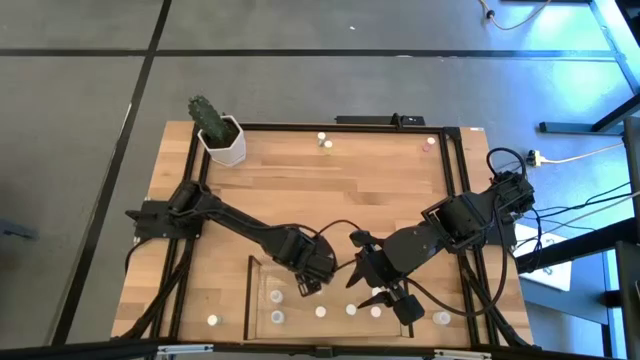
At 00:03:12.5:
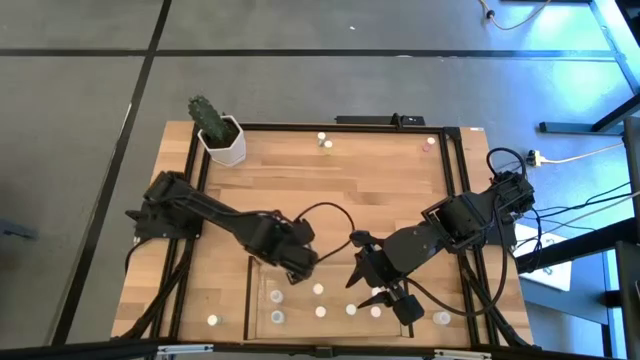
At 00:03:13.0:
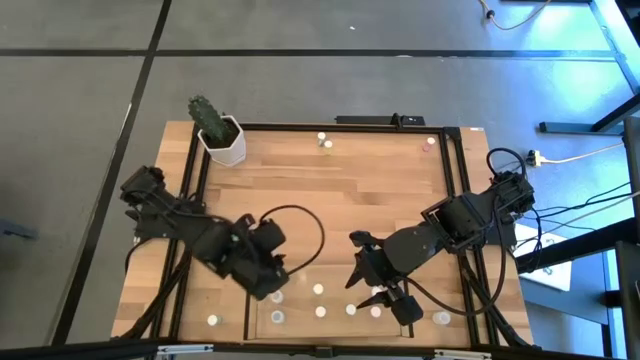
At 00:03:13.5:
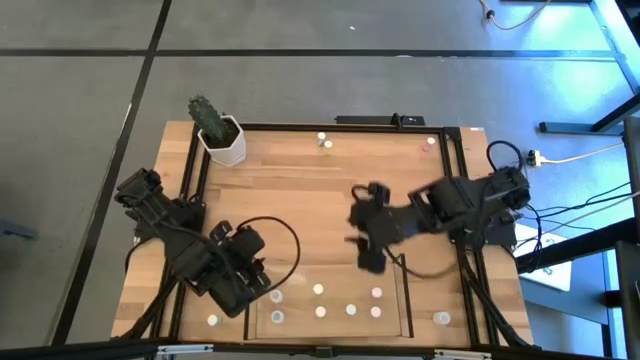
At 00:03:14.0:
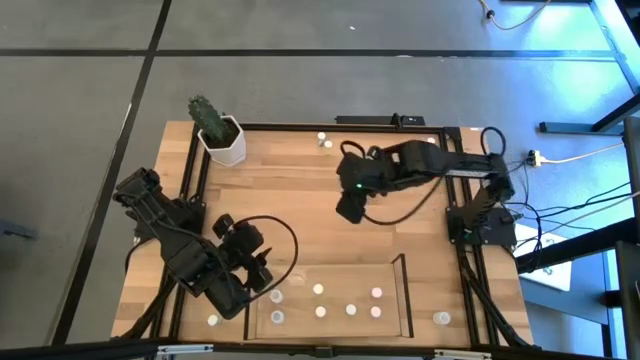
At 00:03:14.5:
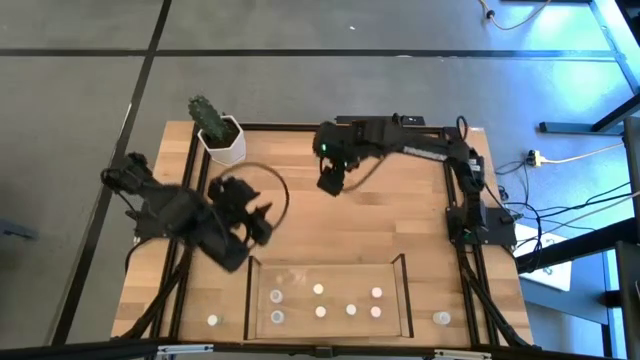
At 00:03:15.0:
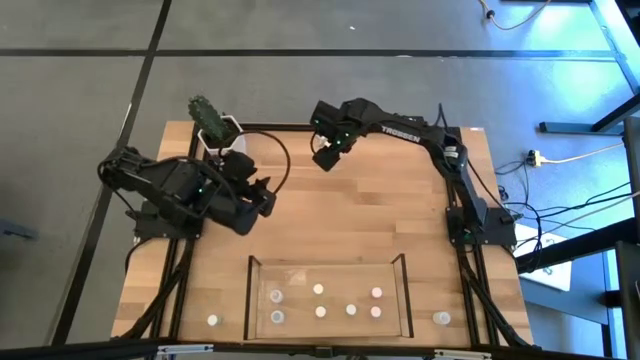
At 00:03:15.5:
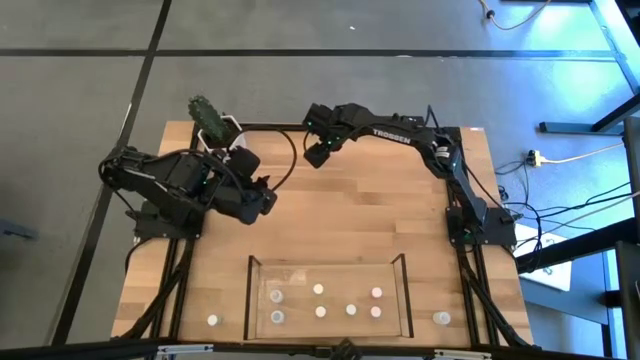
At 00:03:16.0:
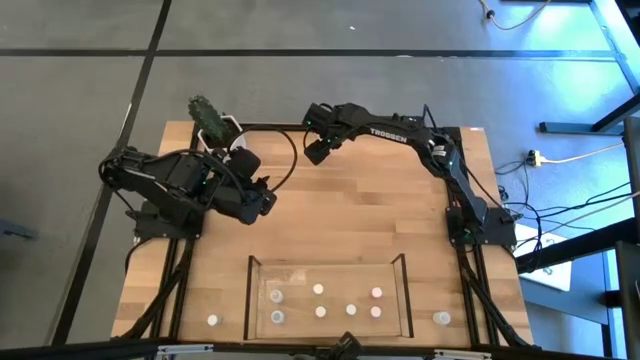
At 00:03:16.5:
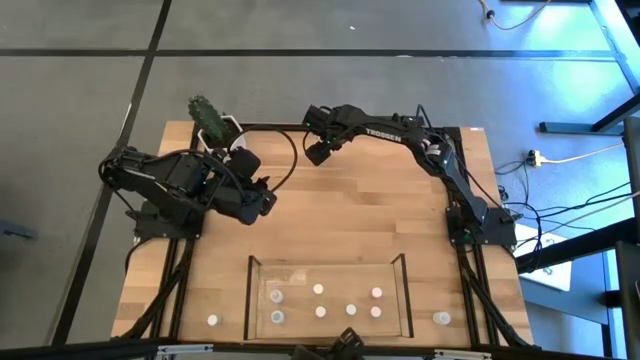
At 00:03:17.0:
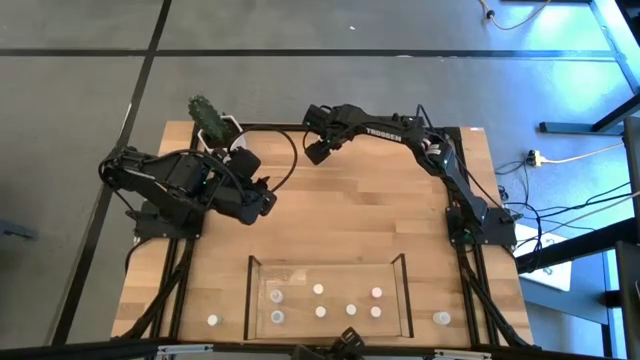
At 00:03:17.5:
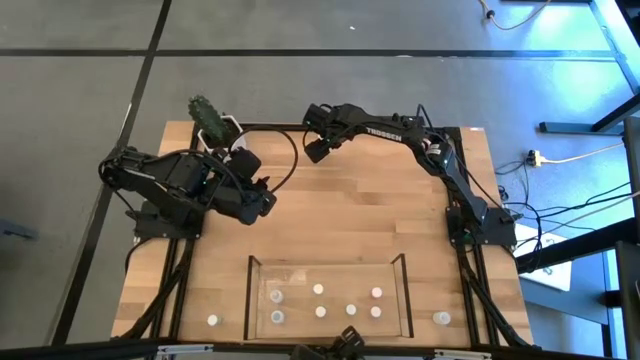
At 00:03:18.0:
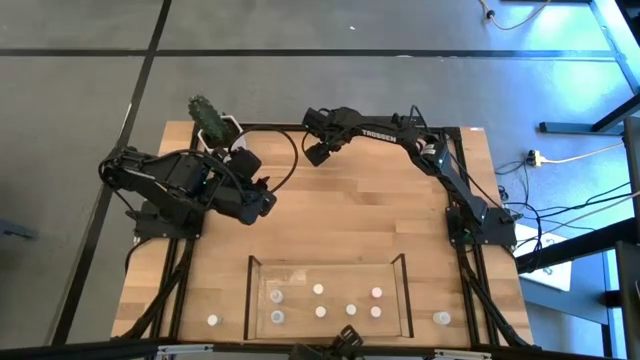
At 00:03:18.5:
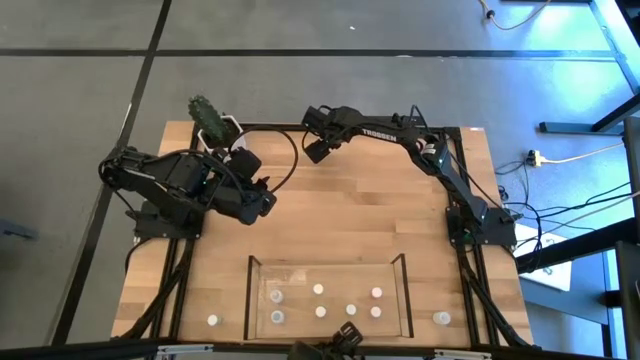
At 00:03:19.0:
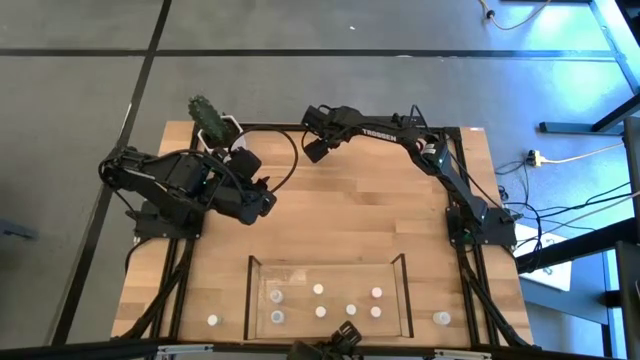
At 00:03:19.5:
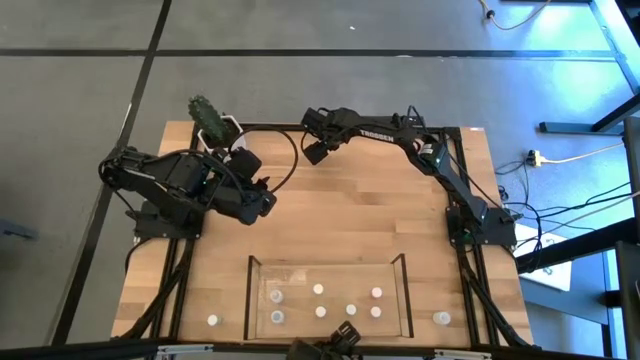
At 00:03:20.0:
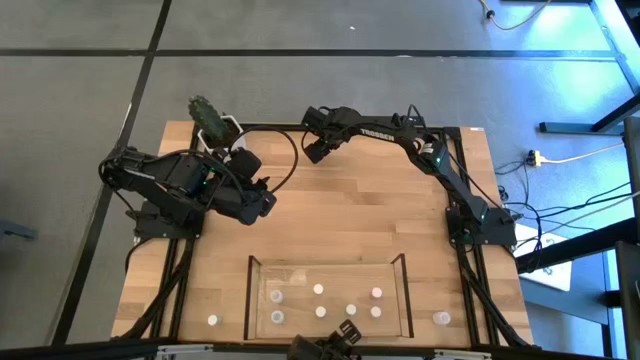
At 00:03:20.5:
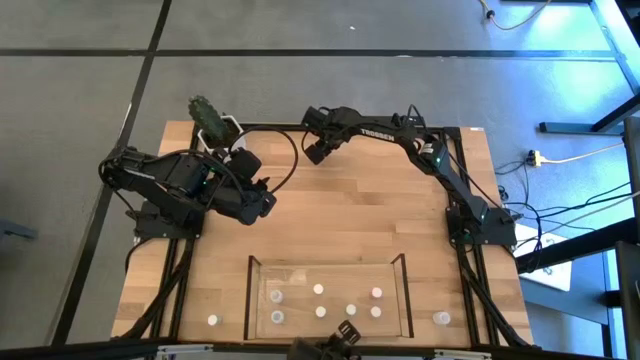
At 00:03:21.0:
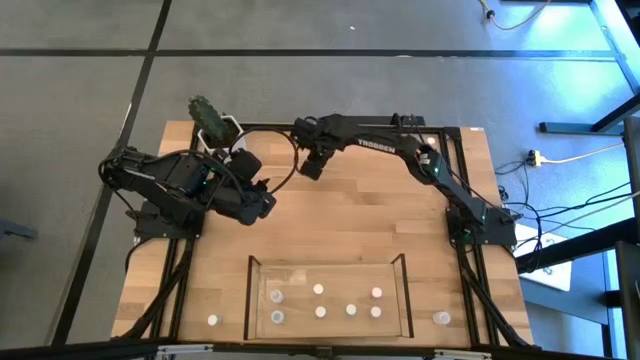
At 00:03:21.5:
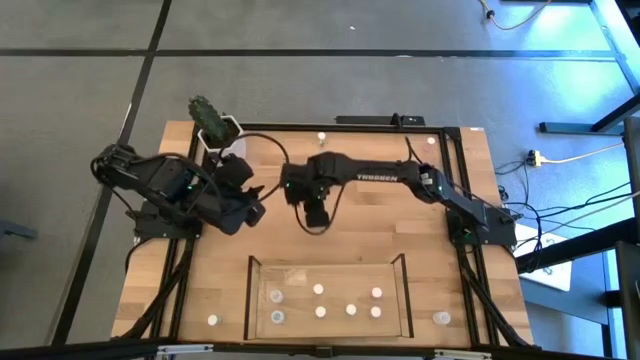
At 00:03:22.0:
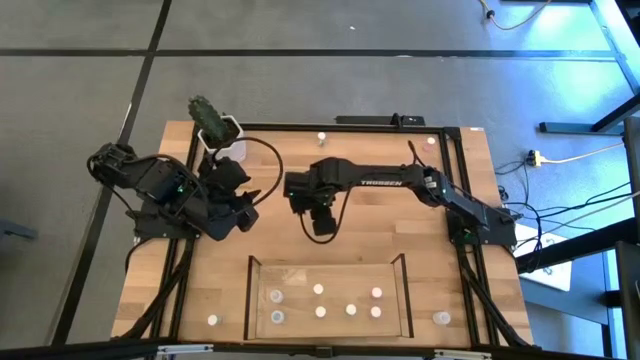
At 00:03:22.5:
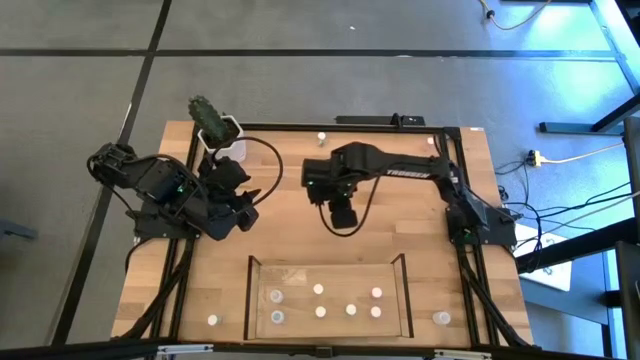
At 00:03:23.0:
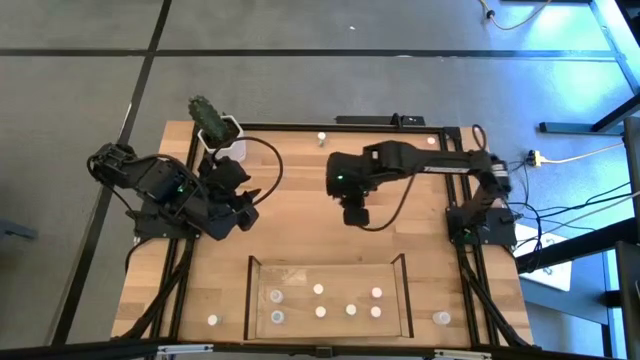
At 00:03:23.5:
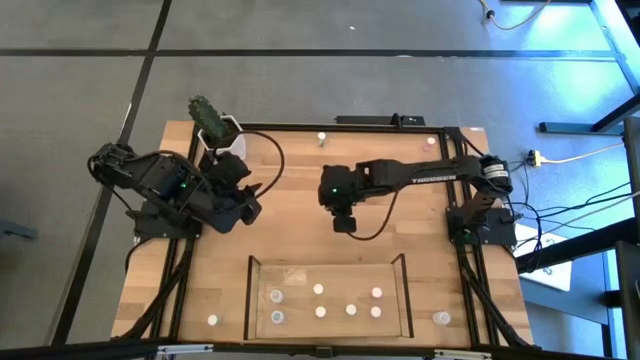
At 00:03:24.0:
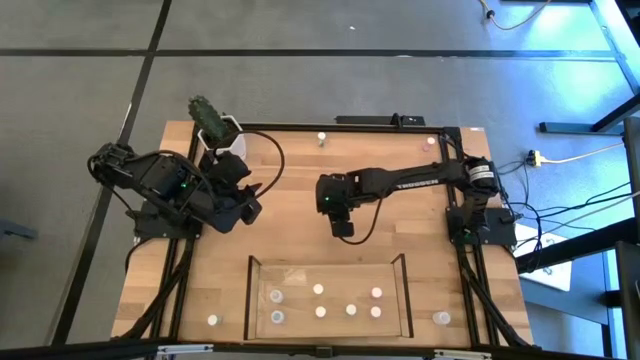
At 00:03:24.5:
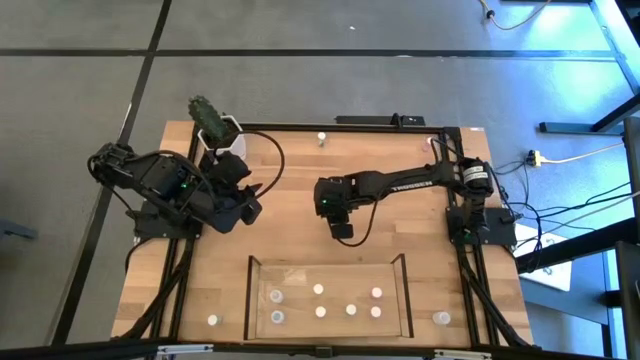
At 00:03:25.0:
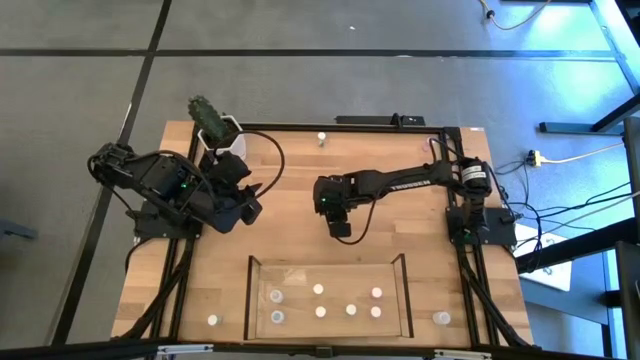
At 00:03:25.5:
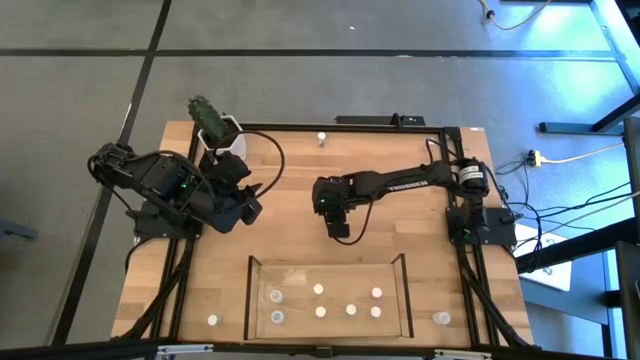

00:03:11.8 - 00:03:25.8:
Task: Pick and place medicine bottles onto shelf by color
Put the yellow pill bottle on the shelf aligned with the other yellow pill bottle

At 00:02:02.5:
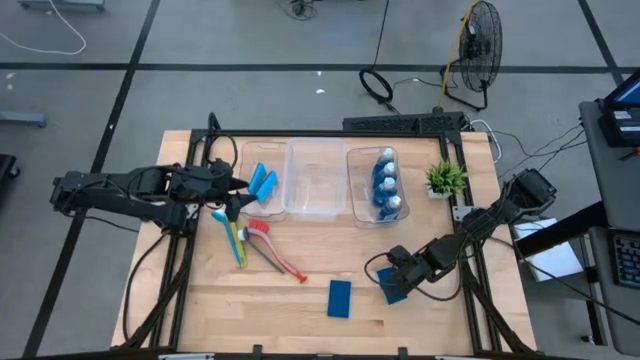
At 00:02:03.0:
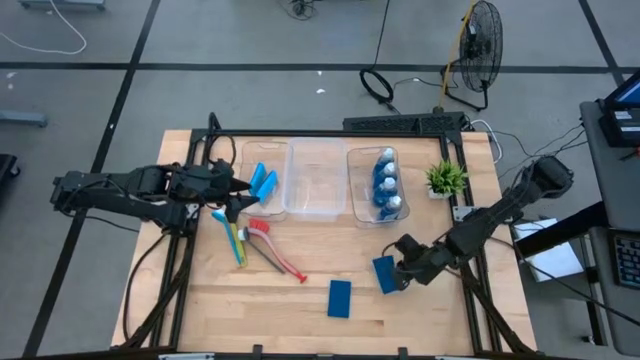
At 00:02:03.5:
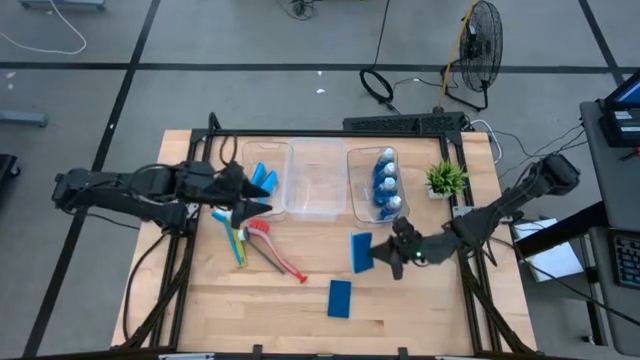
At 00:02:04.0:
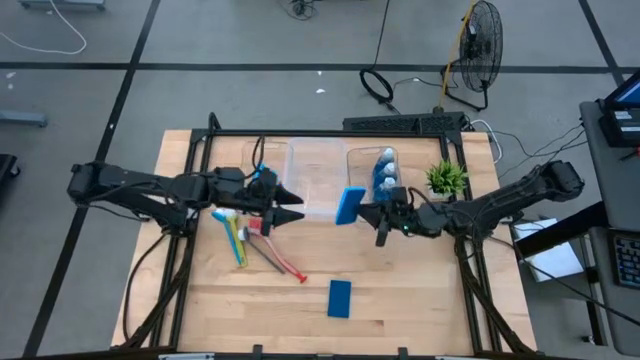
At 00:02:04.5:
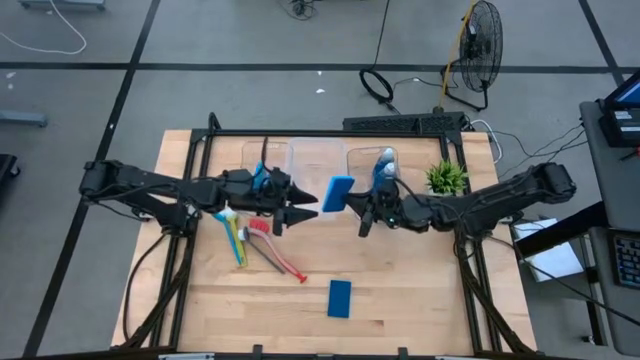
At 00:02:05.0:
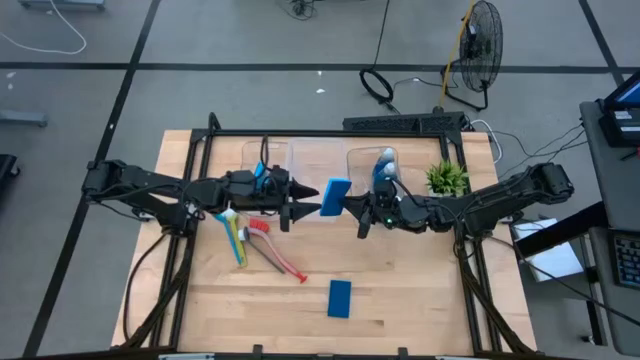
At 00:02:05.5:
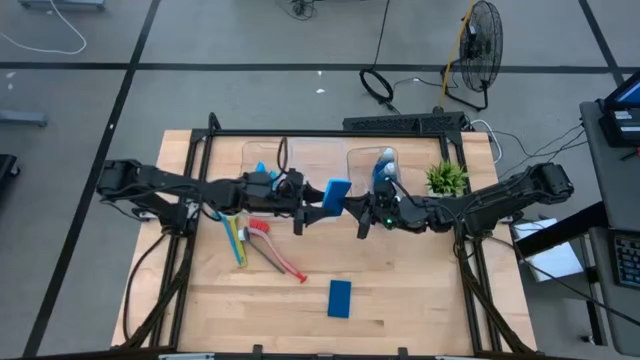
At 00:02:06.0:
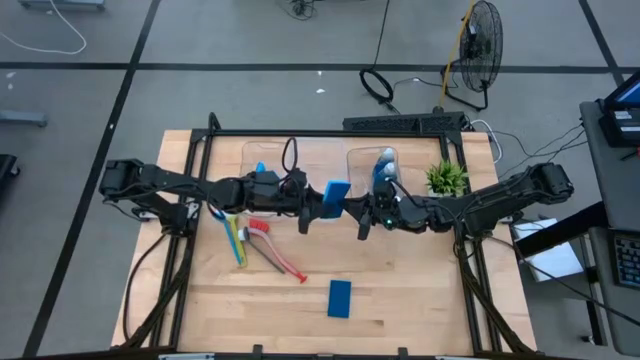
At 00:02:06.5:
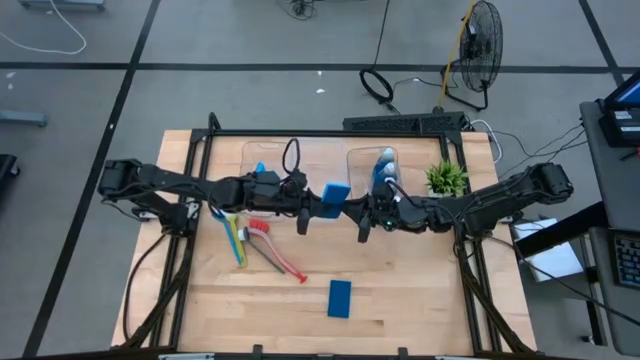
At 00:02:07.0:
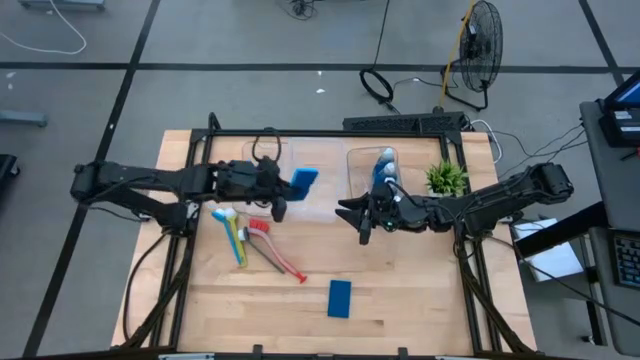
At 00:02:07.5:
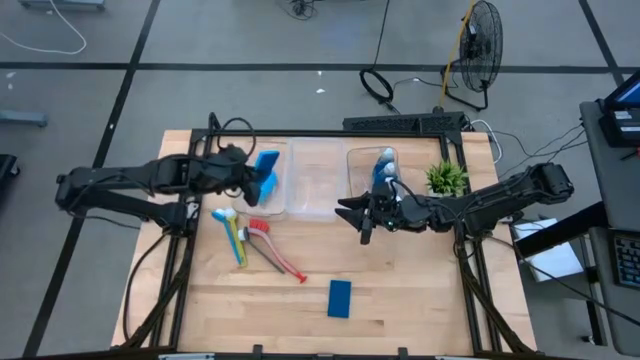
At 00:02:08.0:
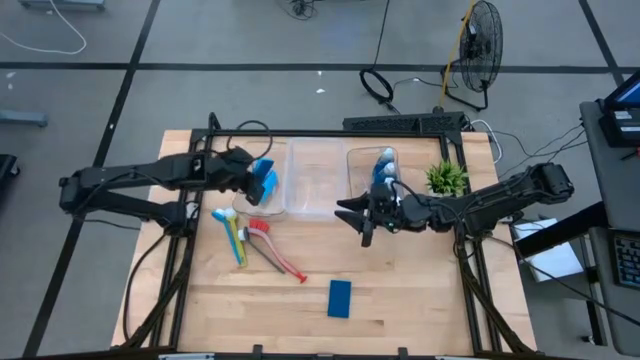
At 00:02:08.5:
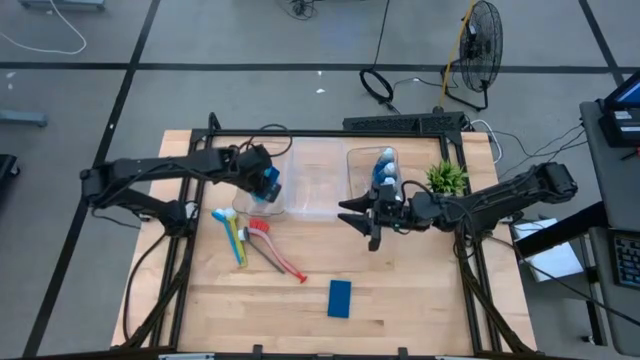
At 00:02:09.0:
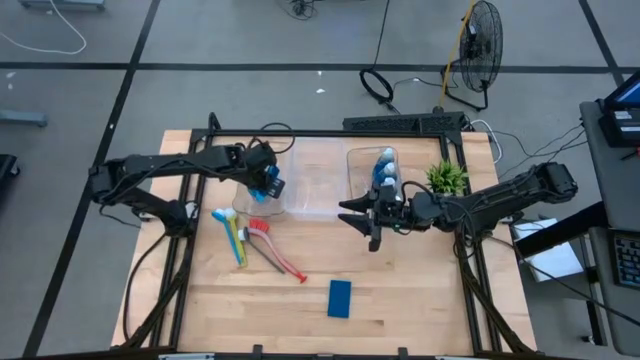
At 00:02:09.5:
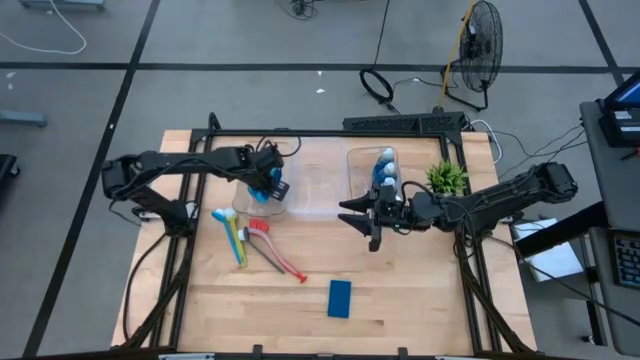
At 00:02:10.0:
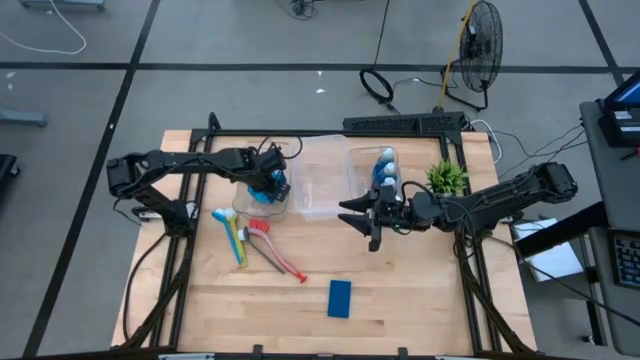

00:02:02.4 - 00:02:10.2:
Task: Pick & Place Kitchen Sink Supplies
Put the blue sponge into the left transparent bin
